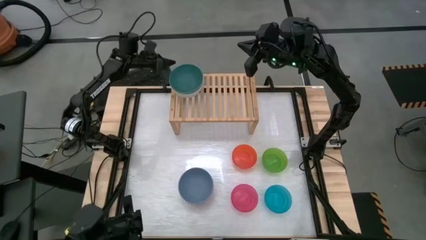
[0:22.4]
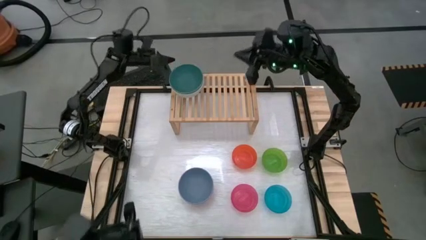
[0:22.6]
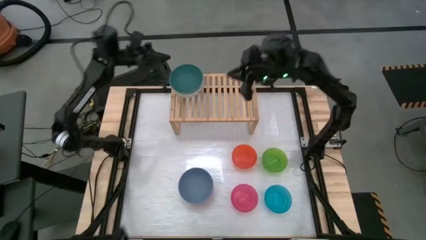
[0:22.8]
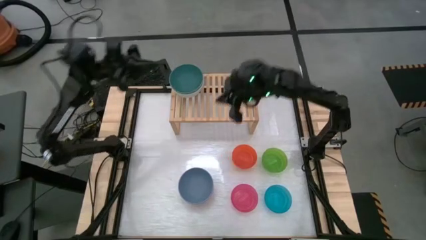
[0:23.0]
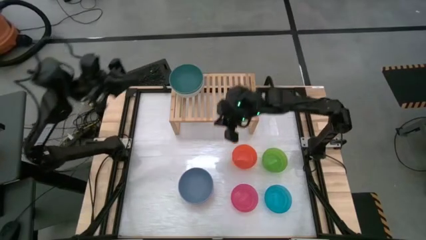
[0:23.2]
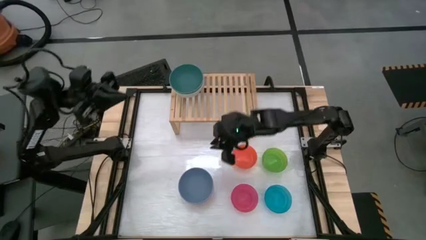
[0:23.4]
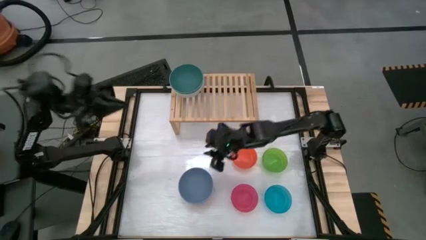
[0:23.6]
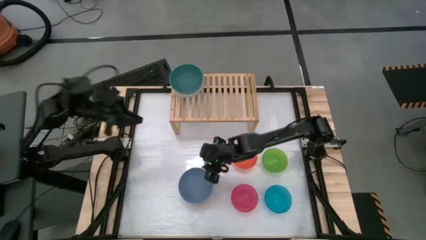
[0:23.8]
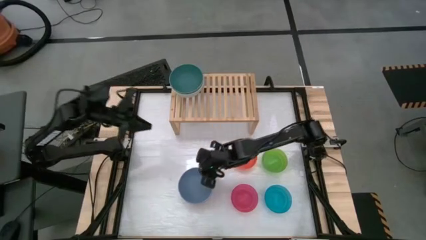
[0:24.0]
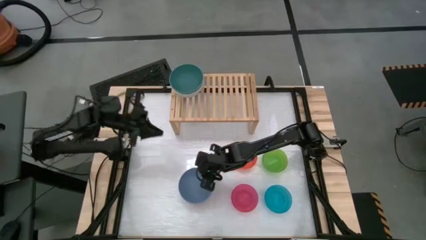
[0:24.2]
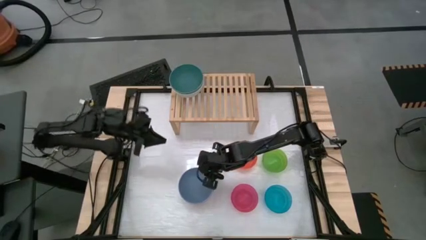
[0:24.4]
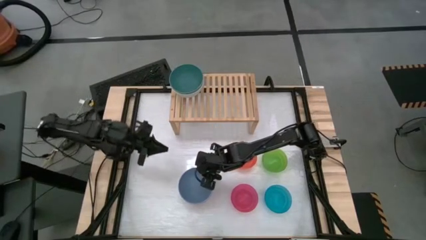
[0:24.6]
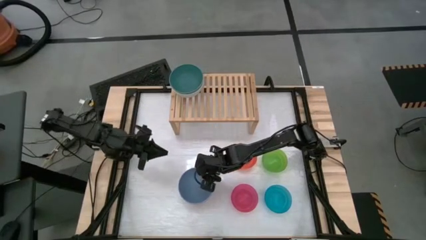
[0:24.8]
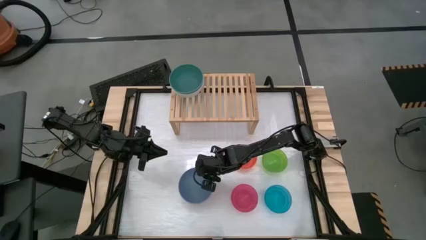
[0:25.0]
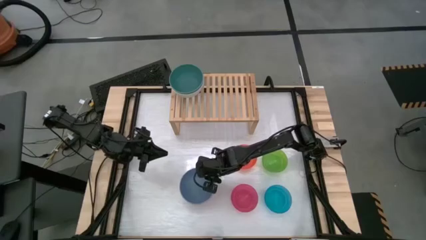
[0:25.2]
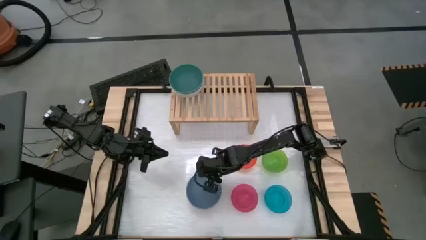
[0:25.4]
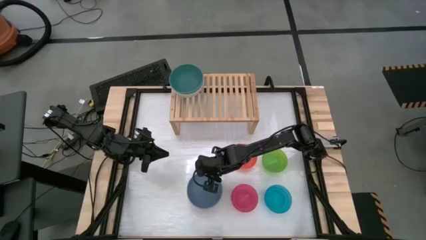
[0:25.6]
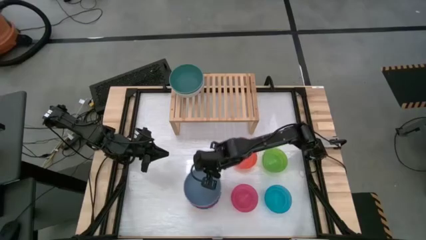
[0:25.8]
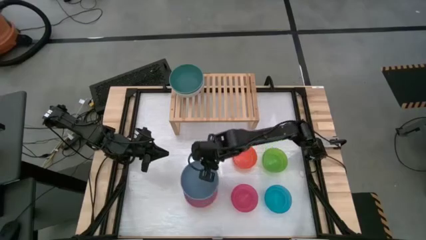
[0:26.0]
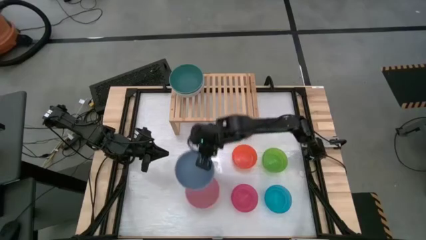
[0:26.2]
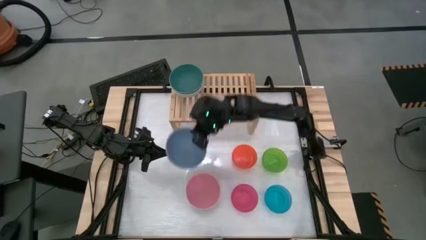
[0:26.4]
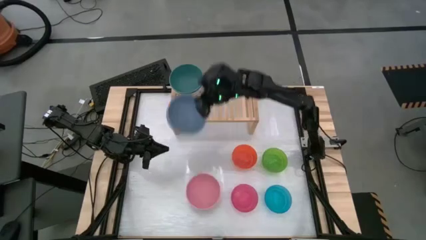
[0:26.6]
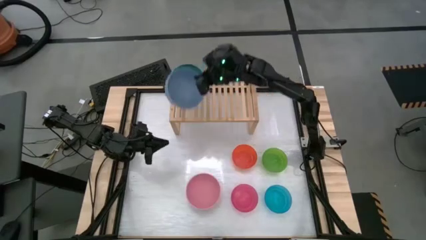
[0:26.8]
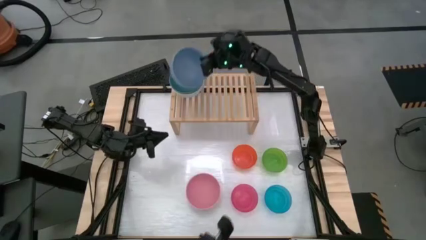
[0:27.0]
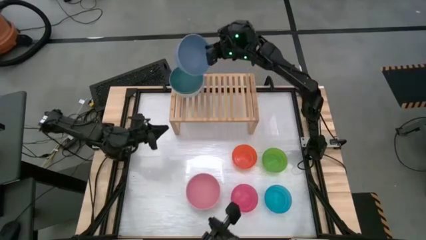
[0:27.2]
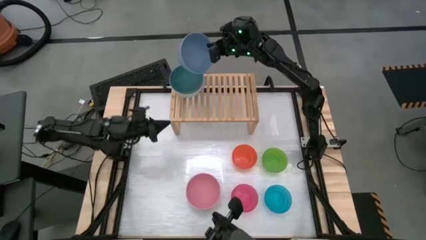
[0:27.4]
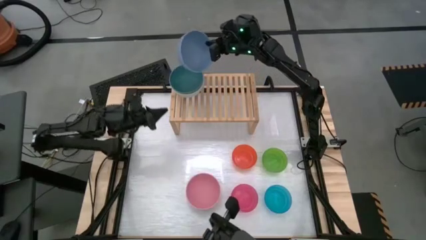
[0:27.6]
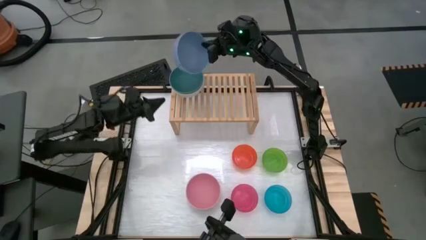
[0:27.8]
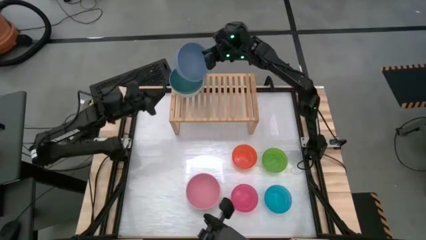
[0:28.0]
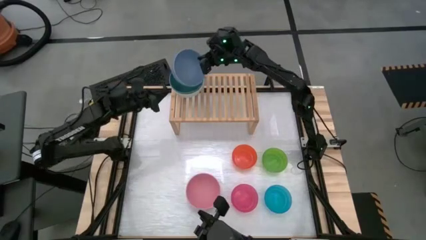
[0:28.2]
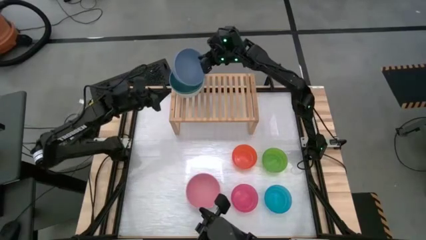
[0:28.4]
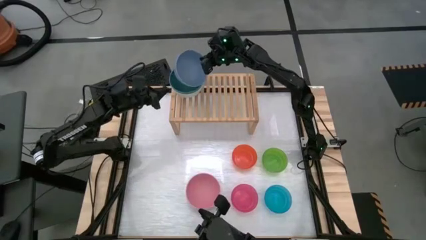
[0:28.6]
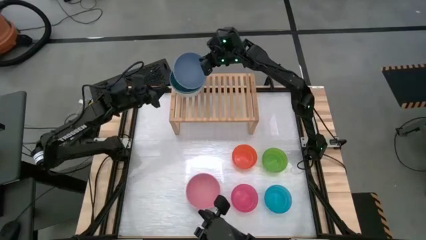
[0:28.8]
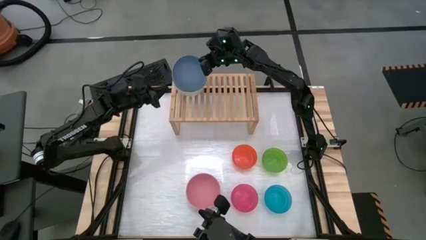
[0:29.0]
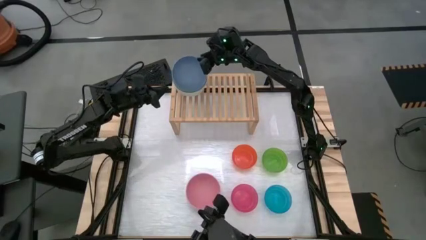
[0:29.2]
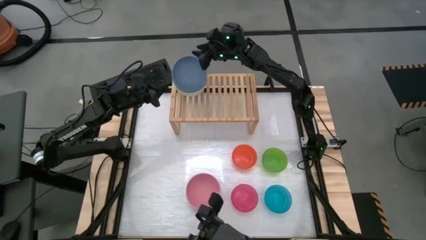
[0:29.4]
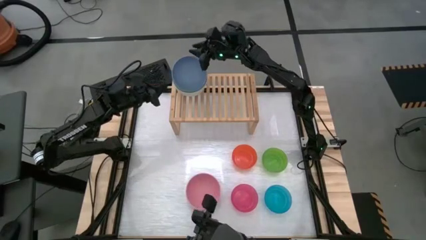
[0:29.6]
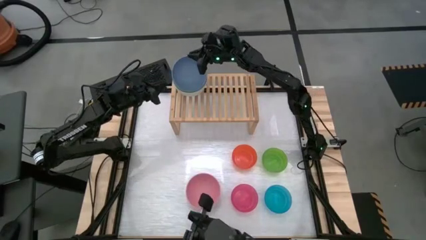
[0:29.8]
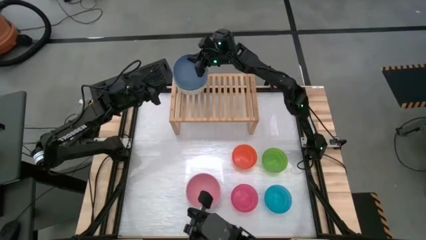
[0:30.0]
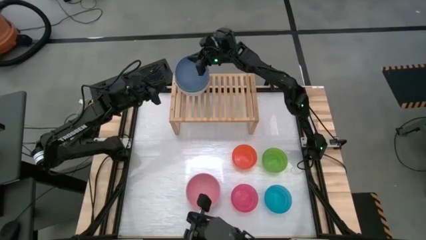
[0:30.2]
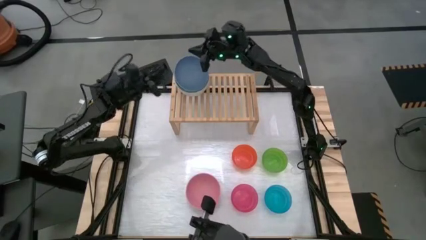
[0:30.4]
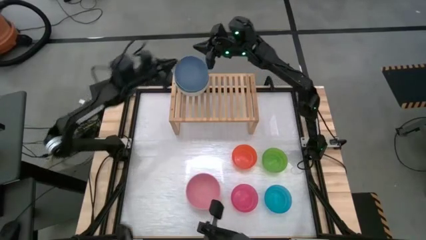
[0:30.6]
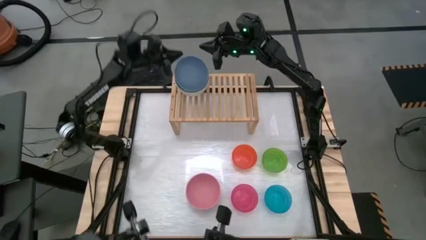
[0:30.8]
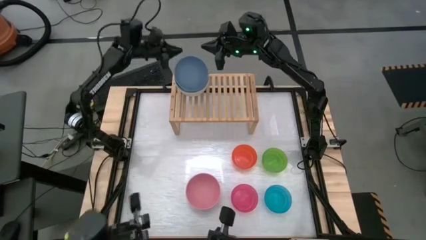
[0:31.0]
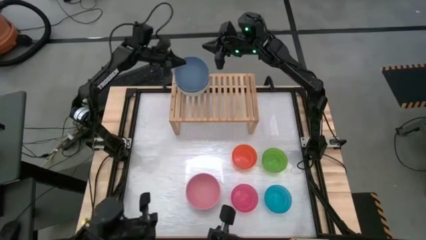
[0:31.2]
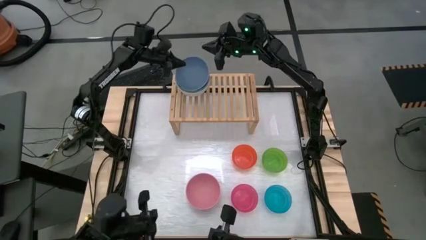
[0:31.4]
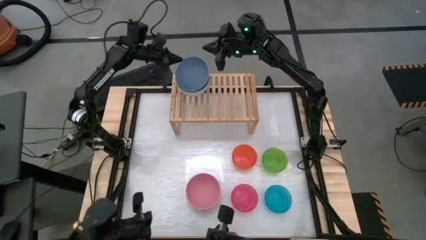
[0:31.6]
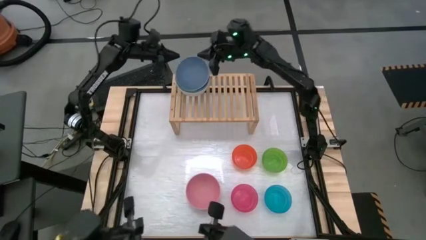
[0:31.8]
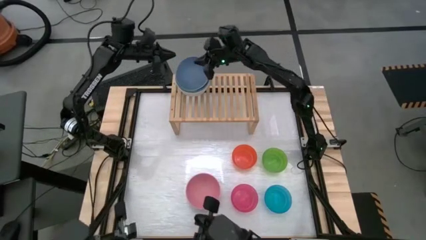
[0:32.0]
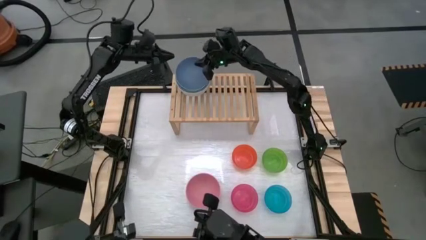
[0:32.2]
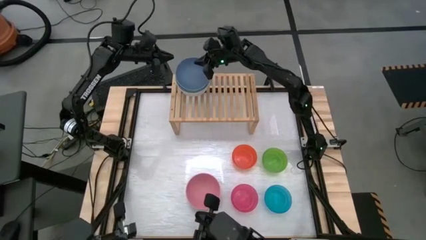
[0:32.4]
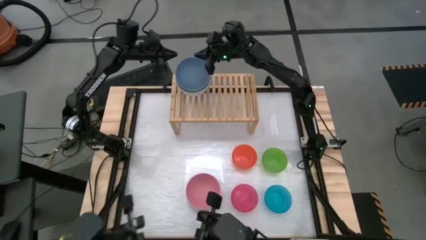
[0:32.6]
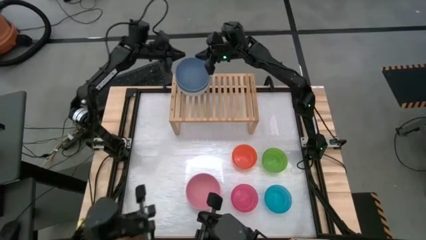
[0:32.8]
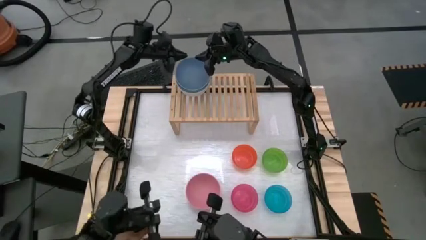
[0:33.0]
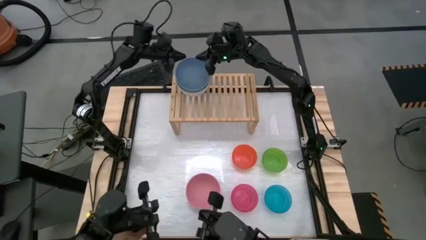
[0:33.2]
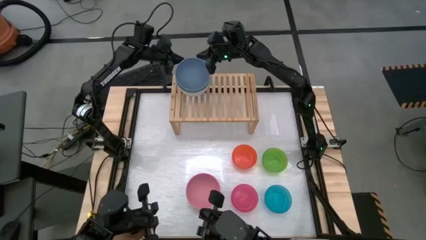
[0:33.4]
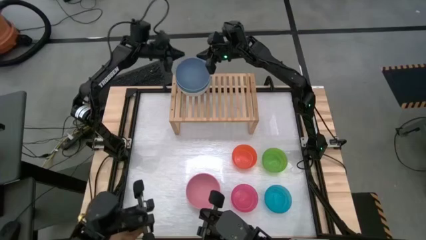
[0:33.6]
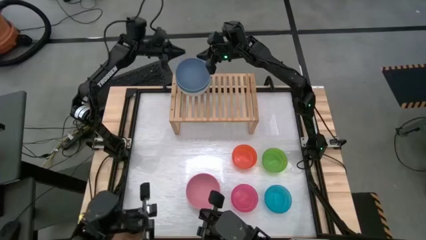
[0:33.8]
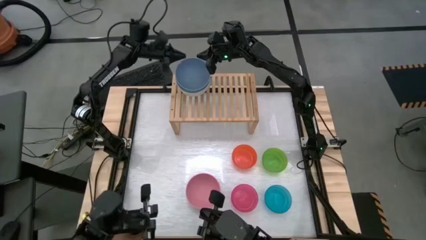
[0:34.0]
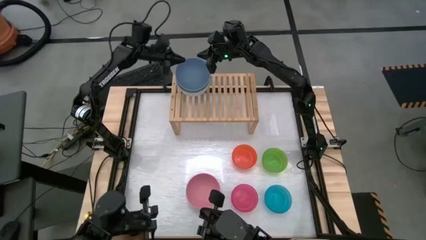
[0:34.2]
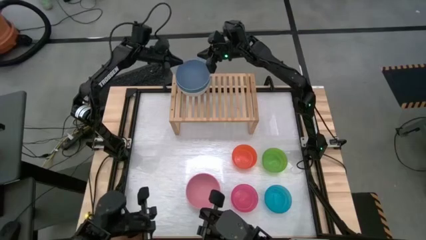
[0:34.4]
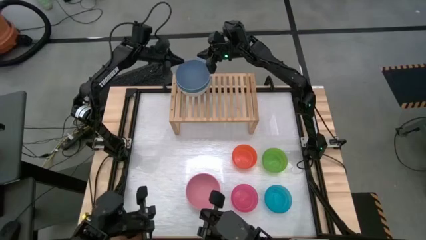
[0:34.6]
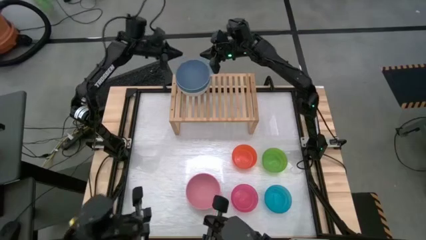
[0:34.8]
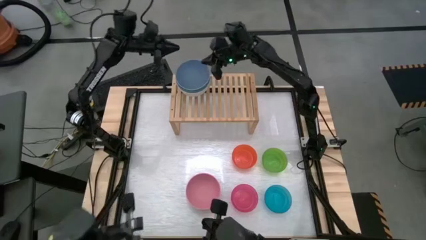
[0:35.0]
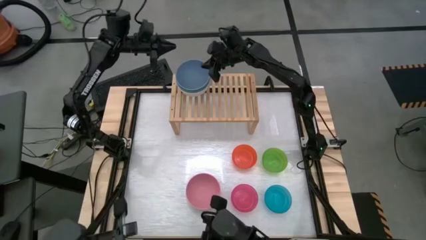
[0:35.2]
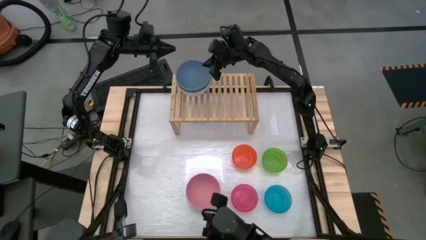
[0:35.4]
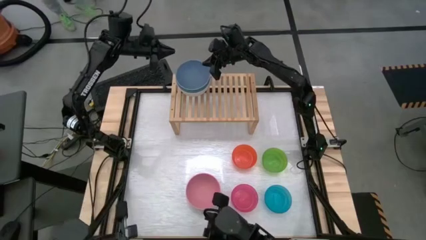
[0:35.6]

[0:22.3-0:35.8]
Task: Place and stack bowls onto a shelf
Stack the large blue bowl on top of the large green bowl
